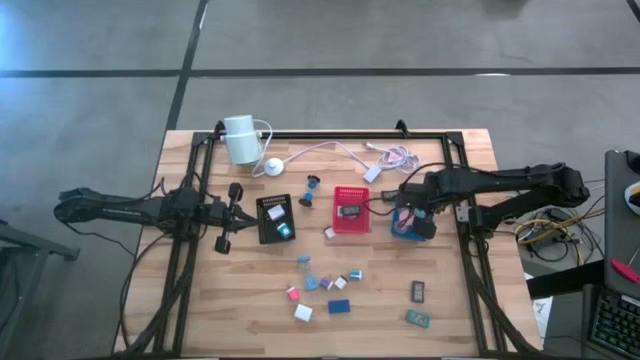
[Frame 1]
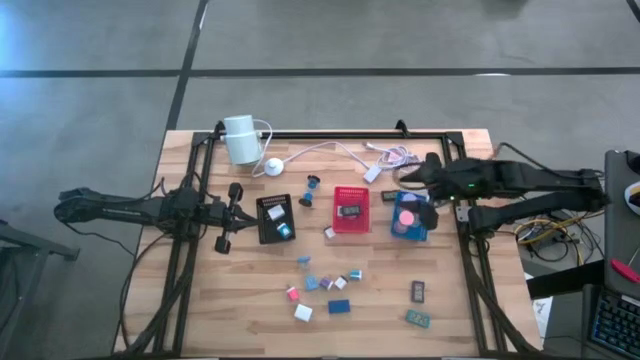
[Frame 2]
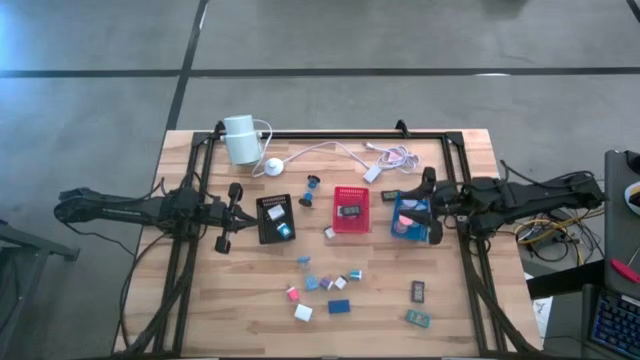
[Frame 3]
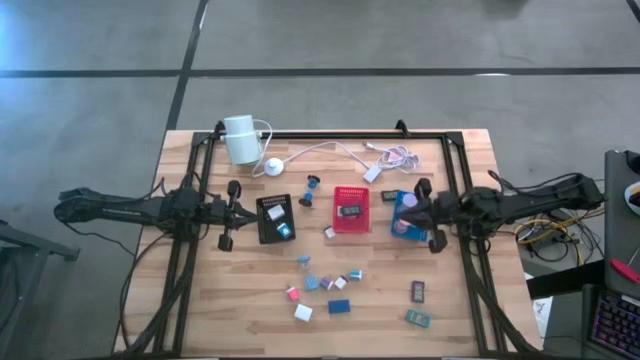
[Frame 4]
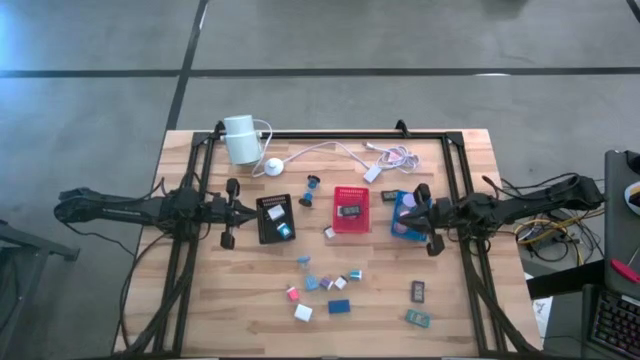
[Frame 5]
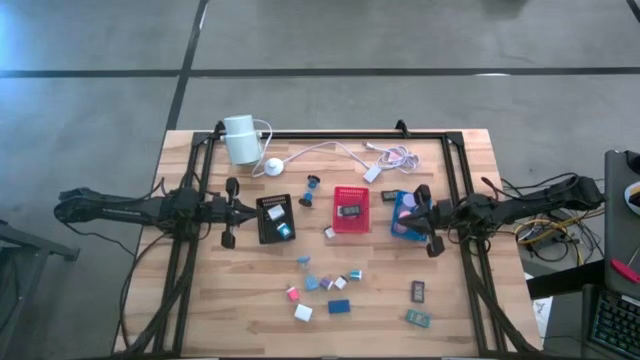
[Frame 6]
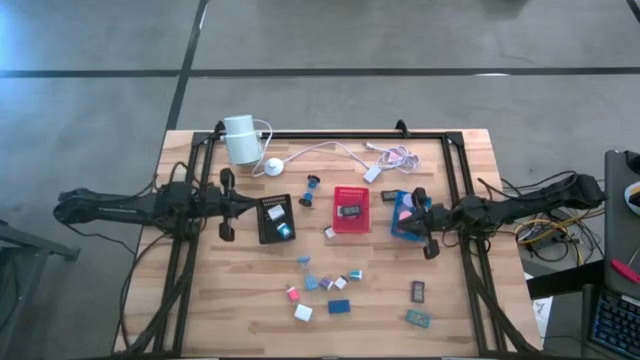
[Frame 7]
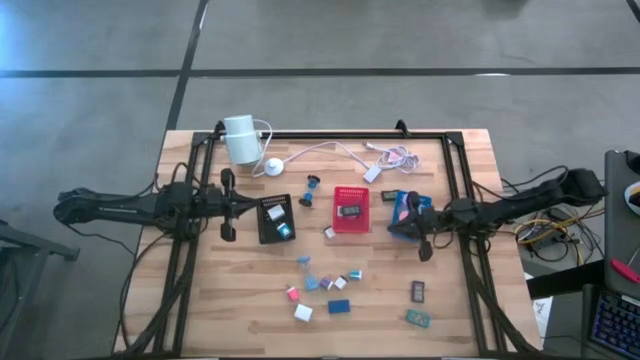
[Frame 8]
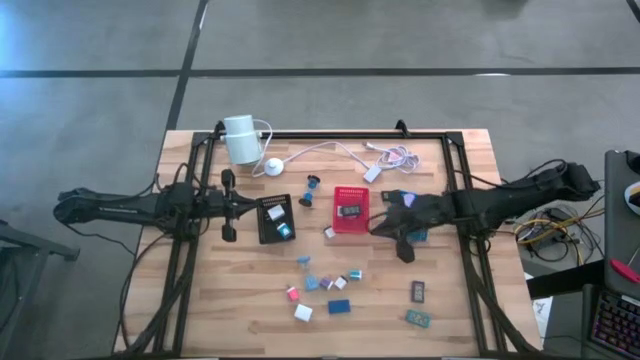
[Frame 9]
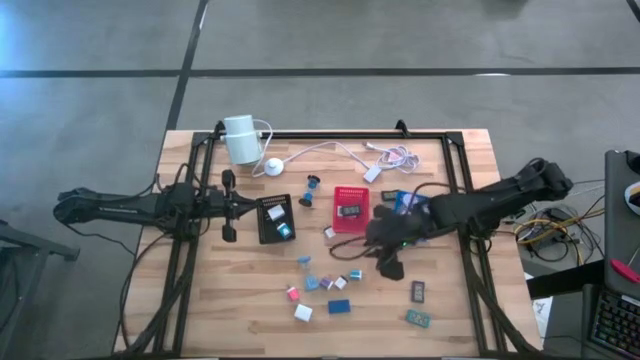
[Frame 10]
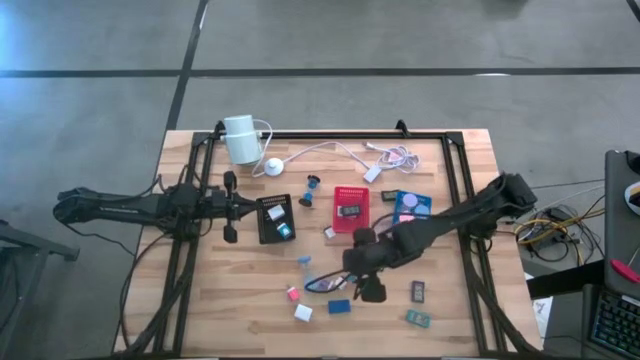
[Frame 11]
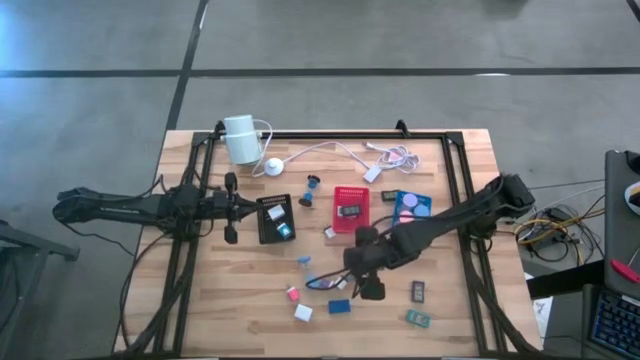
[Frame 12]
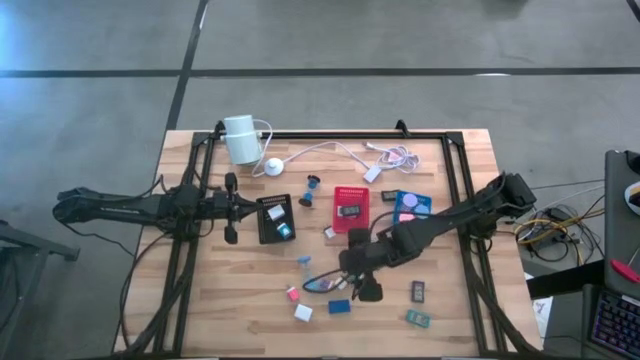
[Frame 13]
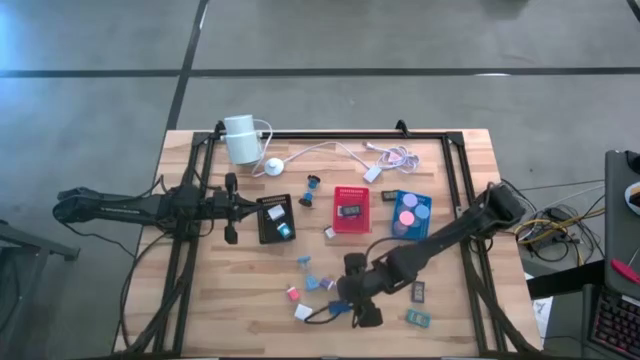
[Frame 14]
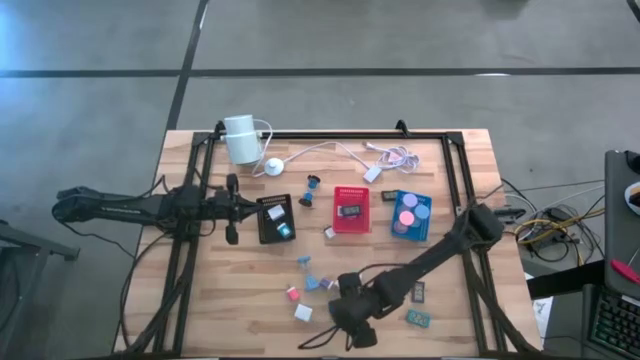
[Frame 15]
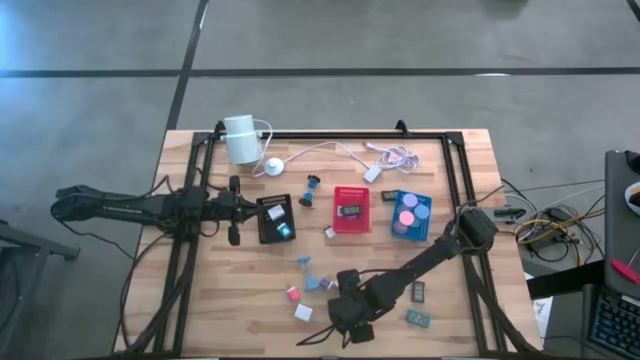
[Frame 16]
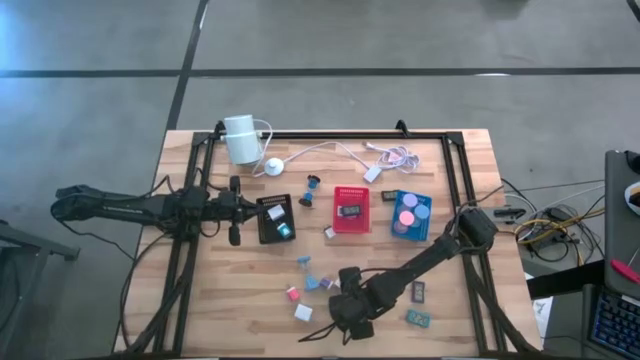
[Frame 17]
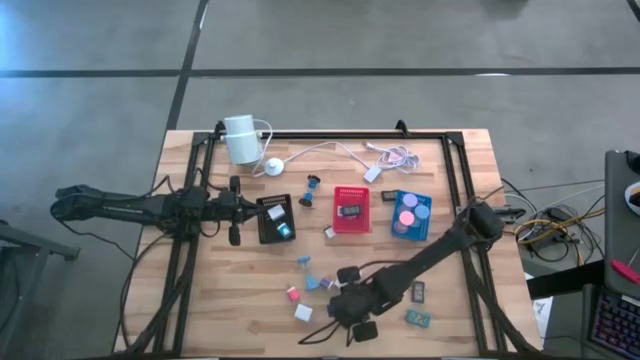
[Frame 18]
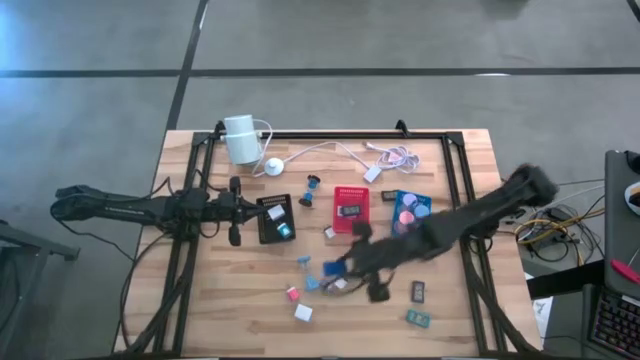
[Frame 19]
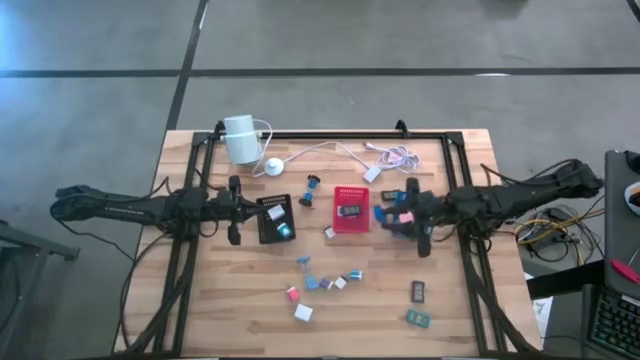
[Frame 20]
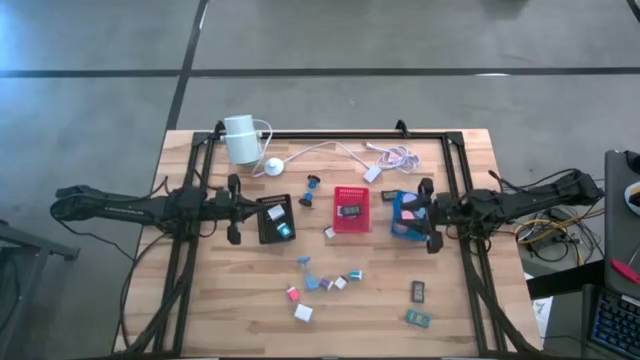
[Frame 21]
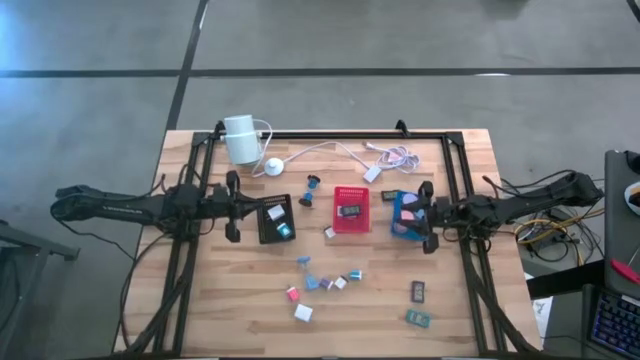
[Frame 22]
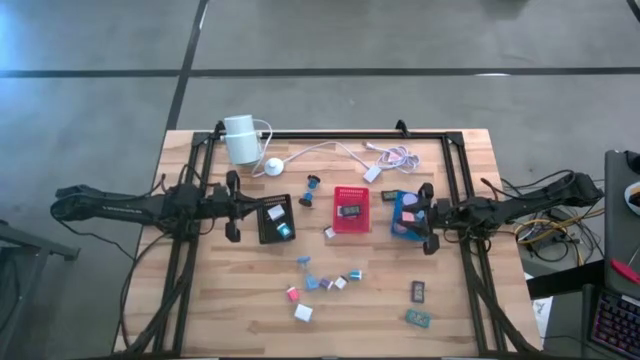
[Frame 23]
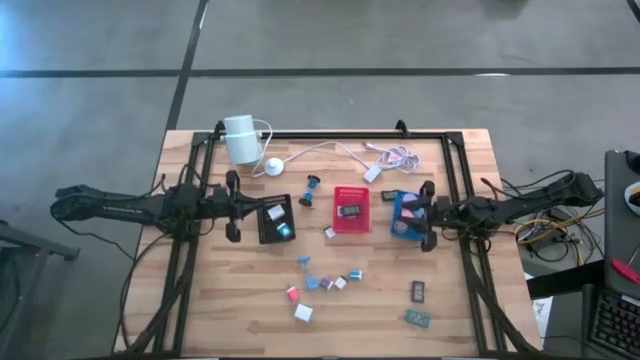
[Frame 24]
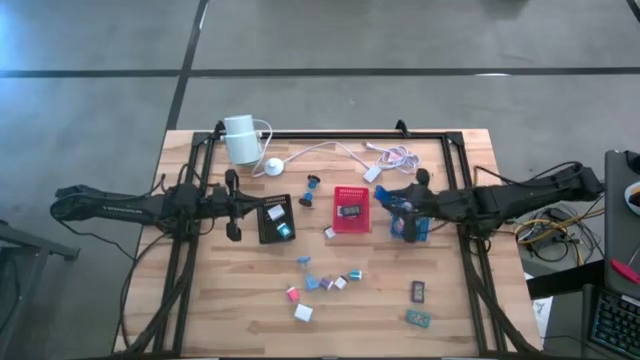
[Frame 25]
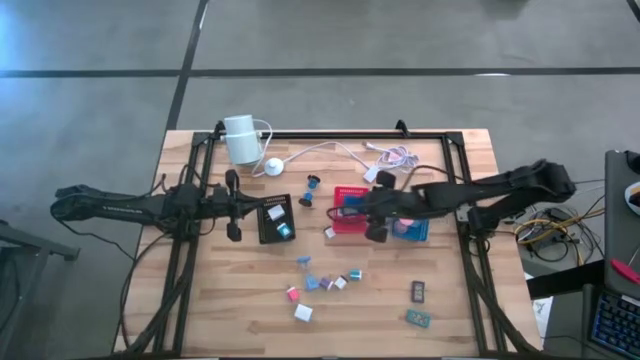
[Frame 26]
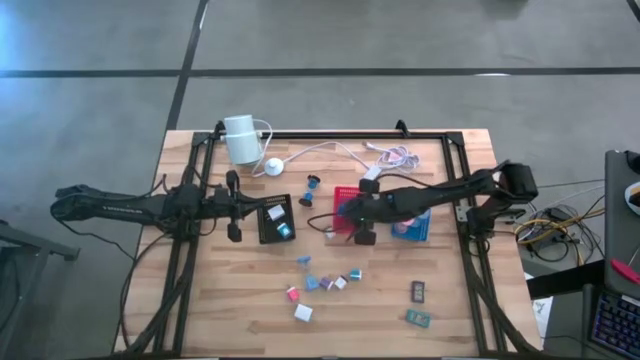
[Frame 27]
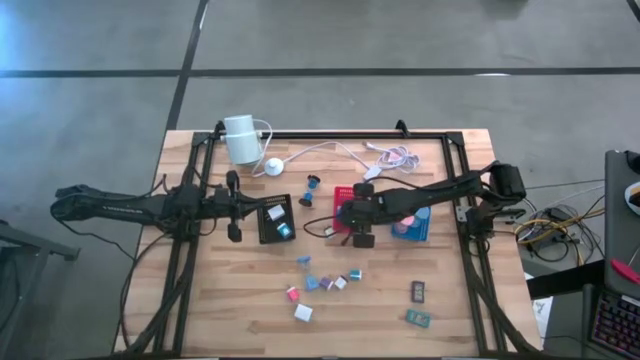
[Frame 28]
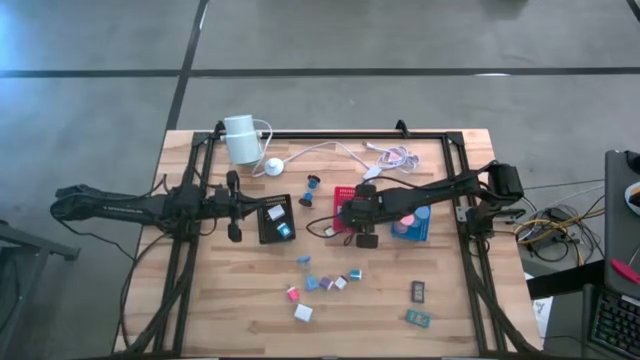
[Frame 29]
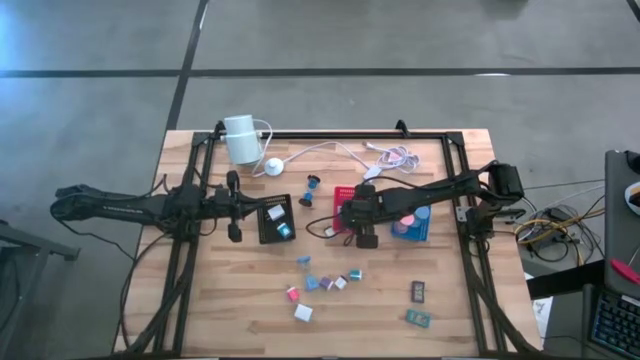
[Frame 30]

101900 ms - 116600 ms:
Task: Pick & Place Office items
Put the blue digital clock into the red bin

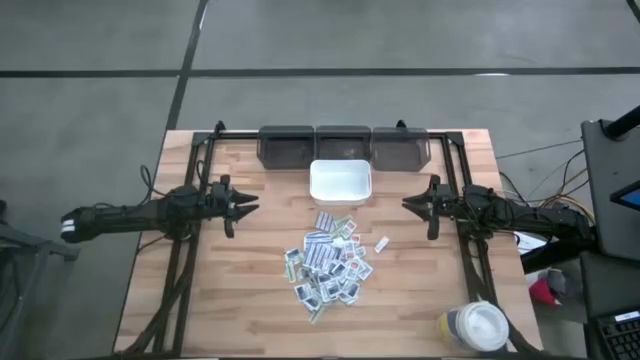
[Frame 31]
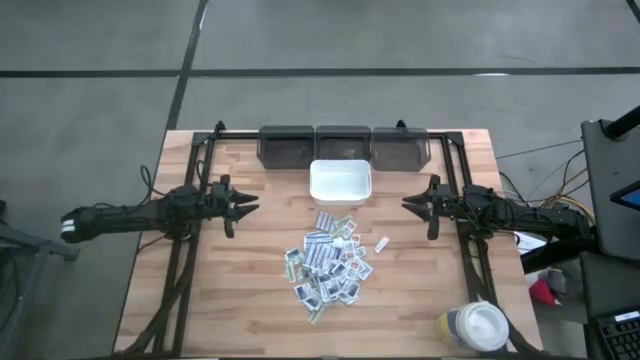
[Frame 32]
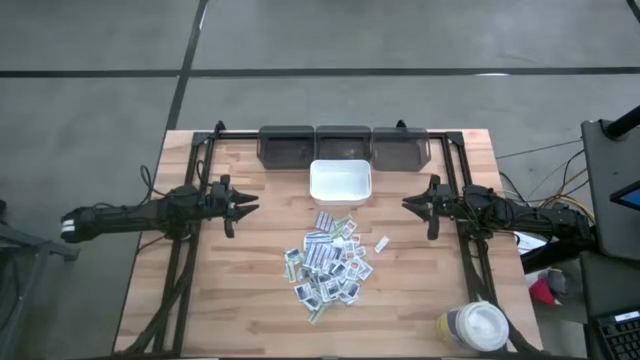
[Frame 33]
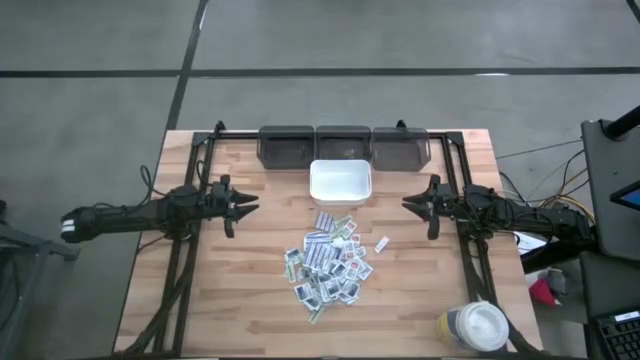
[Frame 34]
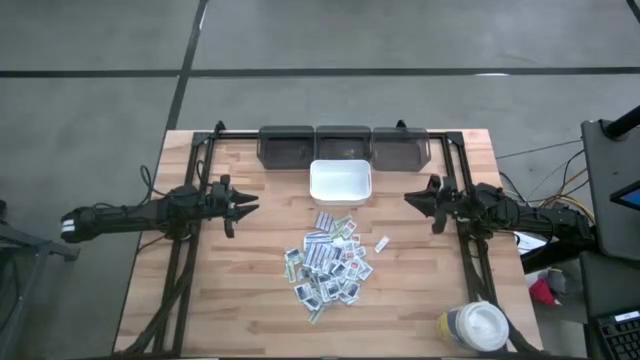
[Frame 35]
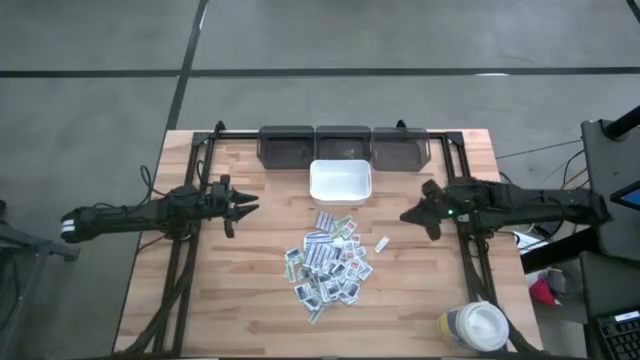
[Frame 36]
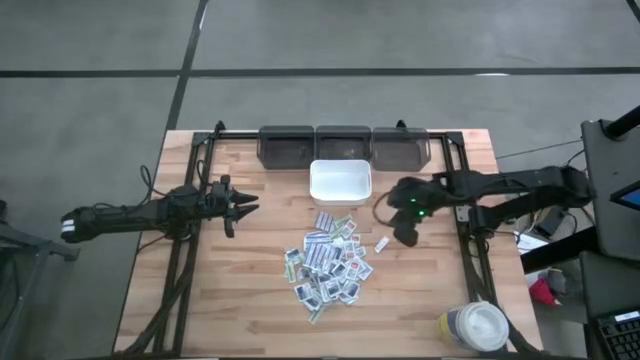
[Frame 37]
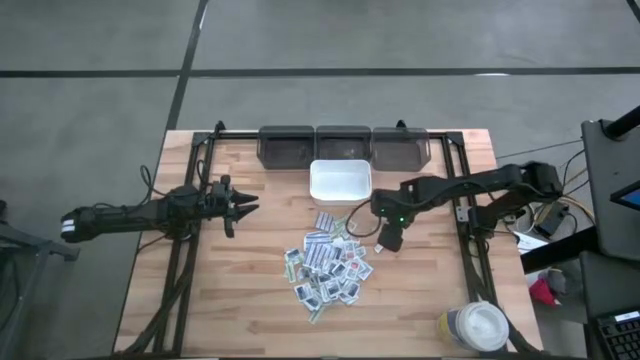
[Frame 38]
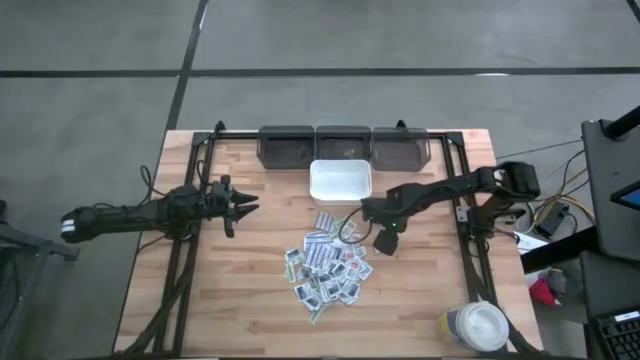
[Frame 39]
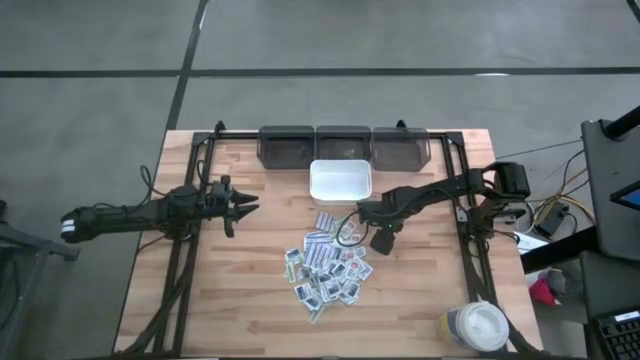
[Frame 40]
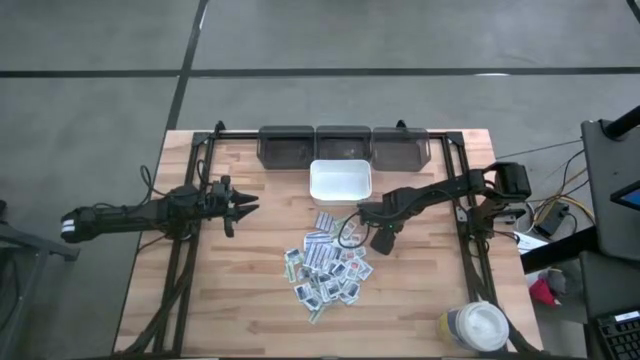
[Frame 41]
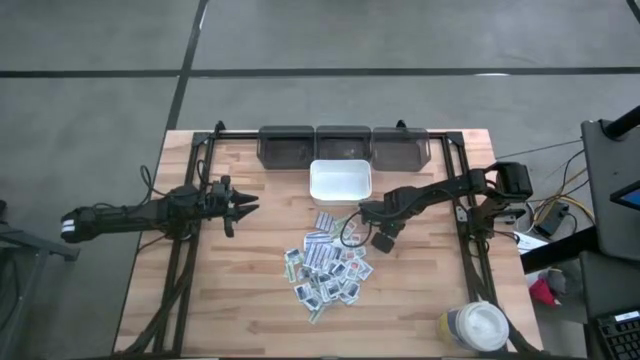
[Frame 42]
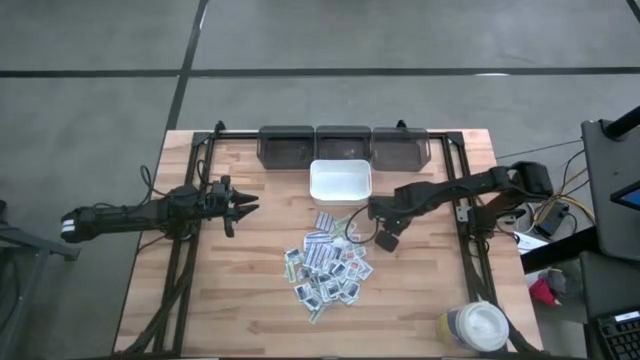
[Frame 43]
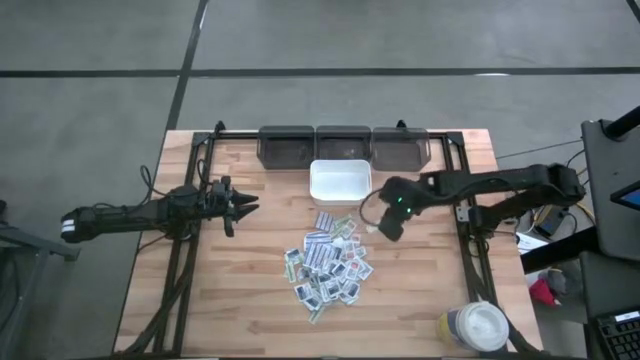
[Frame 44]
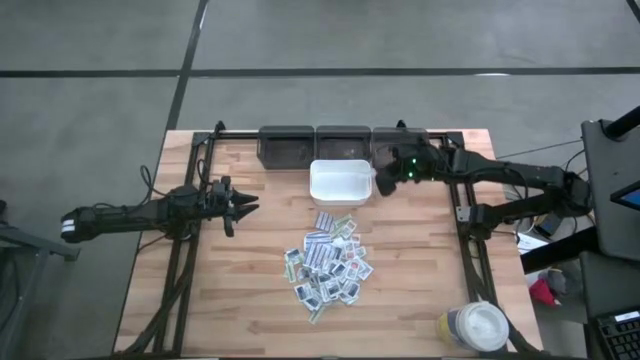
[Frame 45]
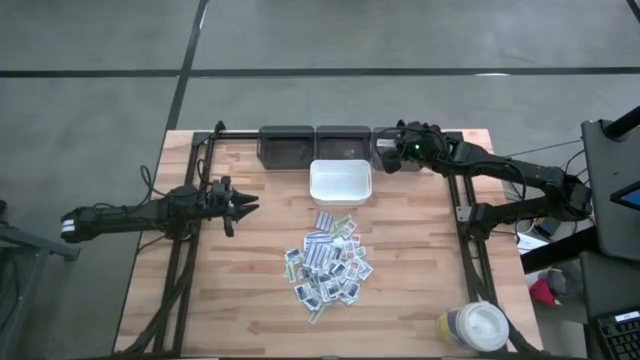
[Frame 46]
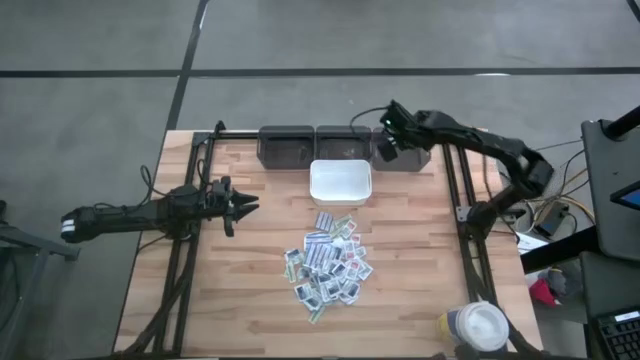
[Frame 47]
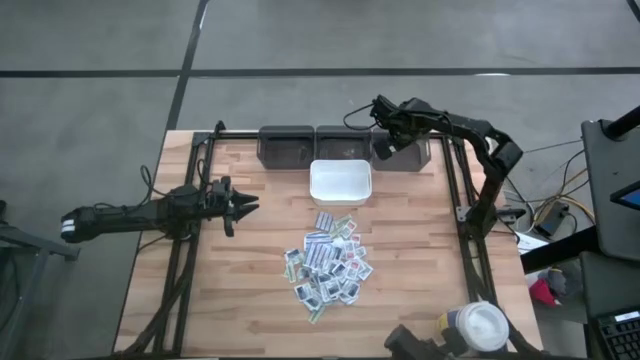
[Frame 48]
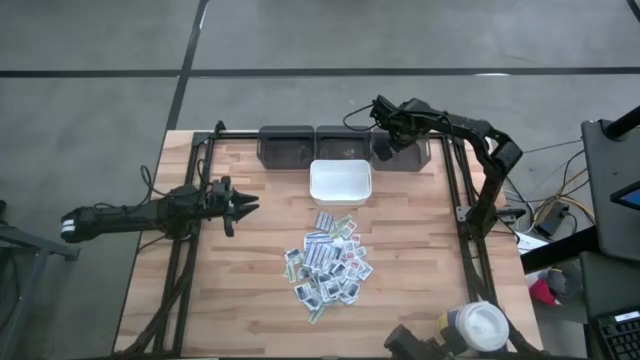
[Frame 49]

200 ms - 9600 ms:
Task: Pick & Place First Aid Supplies
Put the green bandage pack into the right gray bin
